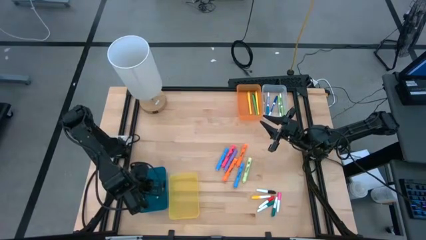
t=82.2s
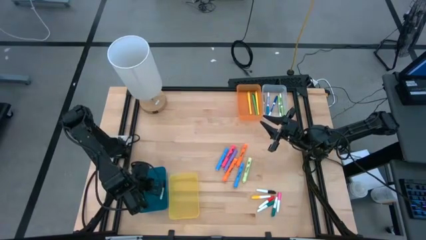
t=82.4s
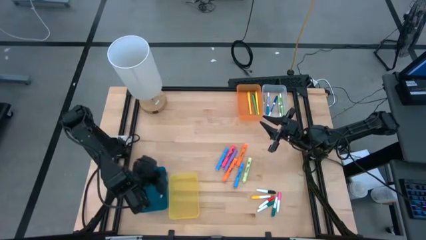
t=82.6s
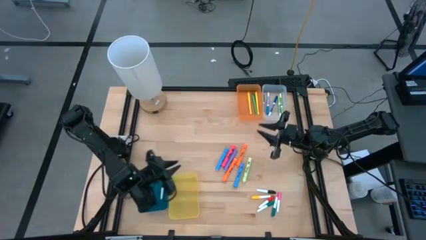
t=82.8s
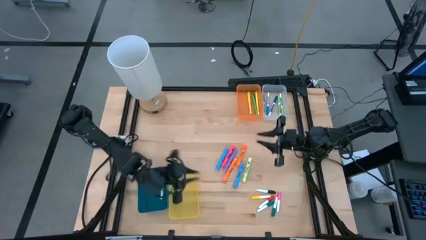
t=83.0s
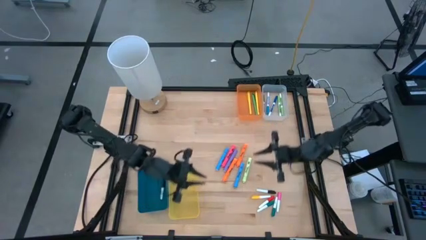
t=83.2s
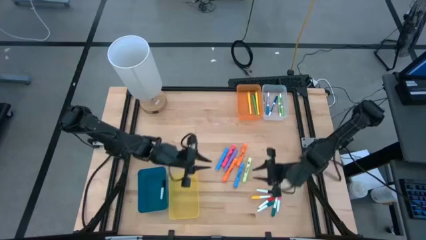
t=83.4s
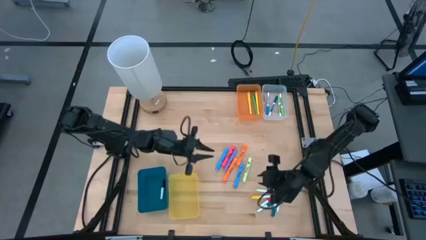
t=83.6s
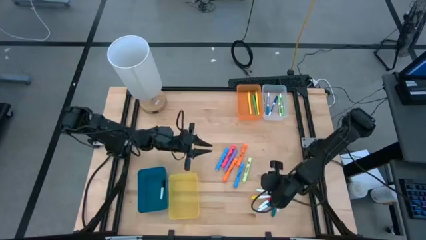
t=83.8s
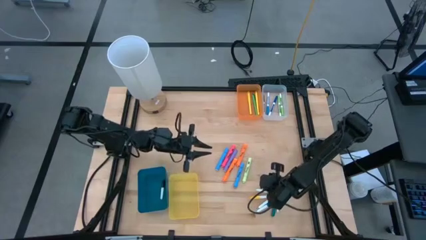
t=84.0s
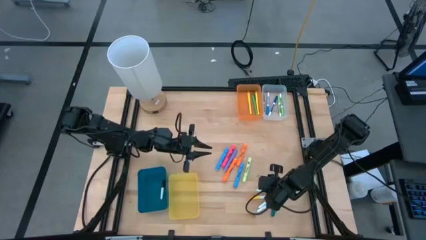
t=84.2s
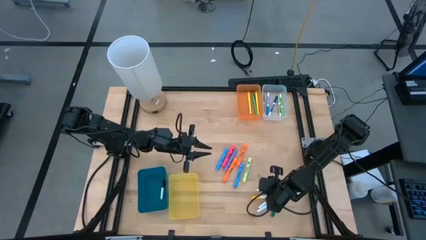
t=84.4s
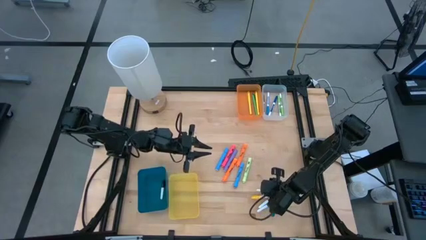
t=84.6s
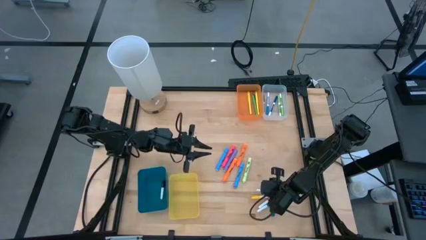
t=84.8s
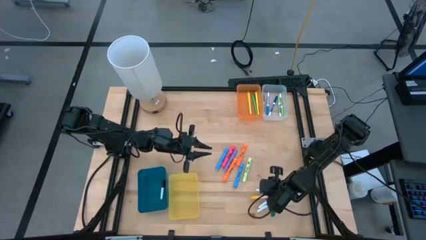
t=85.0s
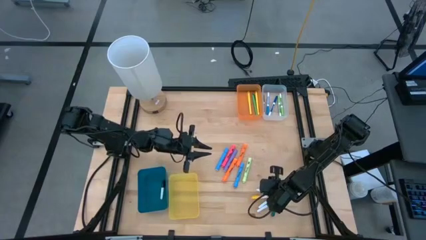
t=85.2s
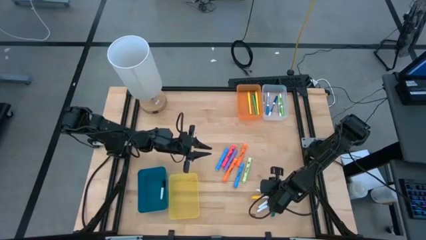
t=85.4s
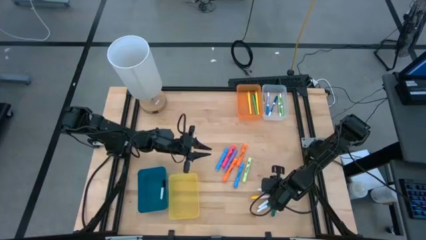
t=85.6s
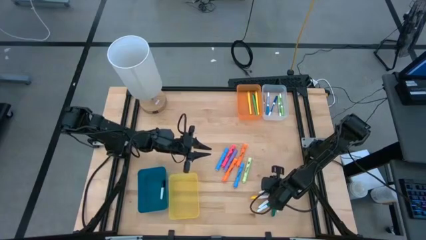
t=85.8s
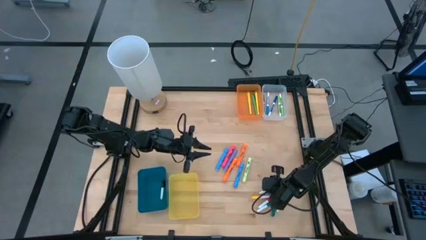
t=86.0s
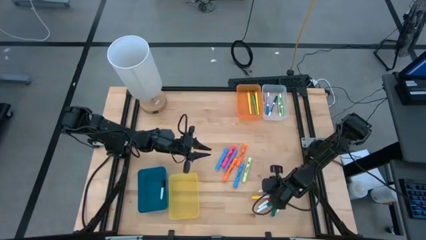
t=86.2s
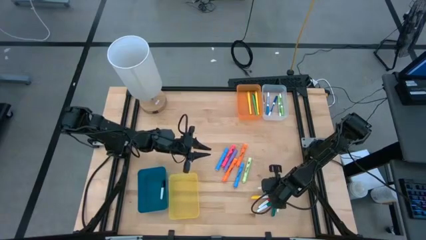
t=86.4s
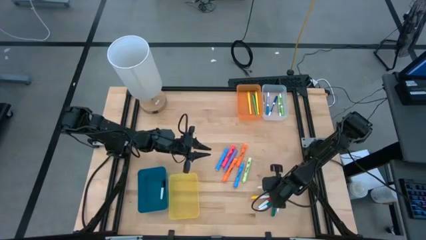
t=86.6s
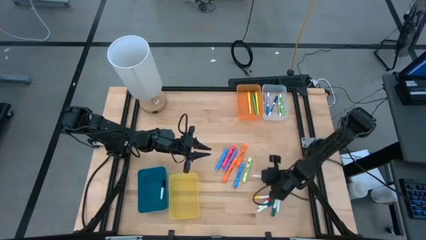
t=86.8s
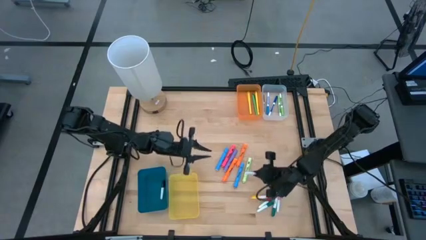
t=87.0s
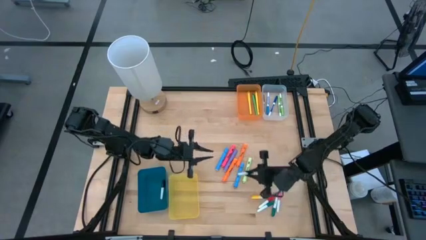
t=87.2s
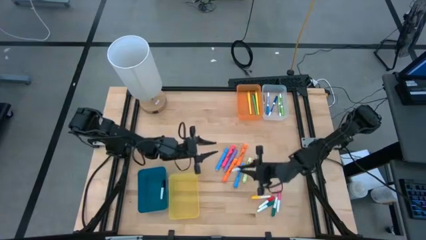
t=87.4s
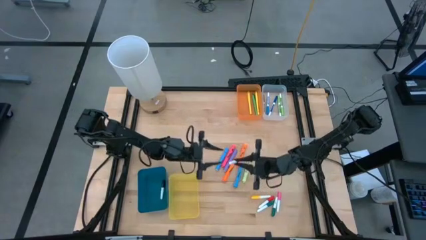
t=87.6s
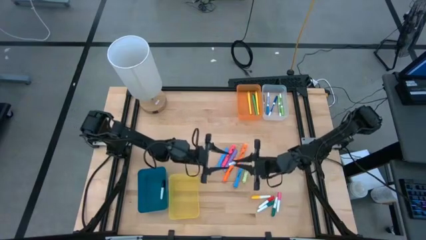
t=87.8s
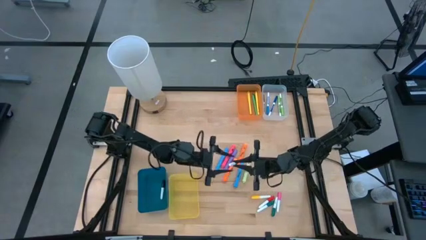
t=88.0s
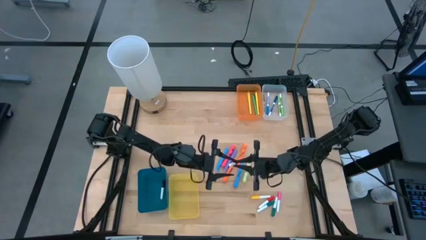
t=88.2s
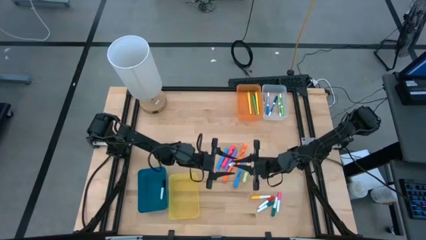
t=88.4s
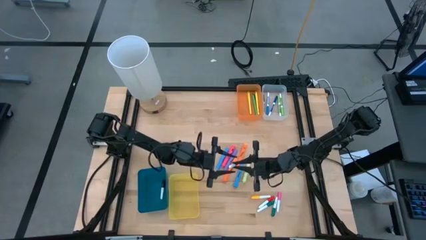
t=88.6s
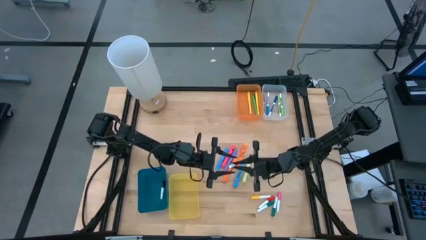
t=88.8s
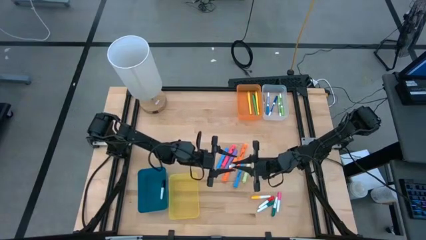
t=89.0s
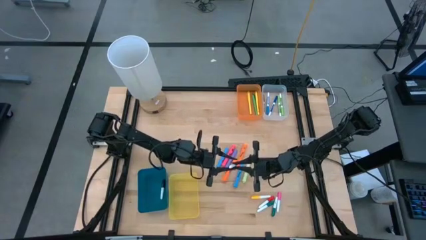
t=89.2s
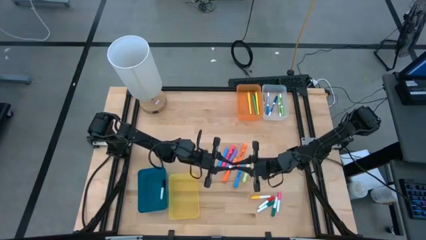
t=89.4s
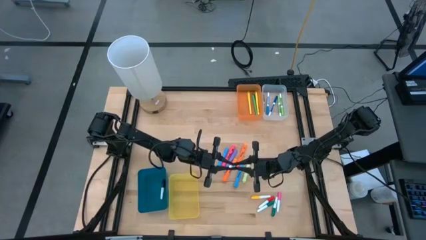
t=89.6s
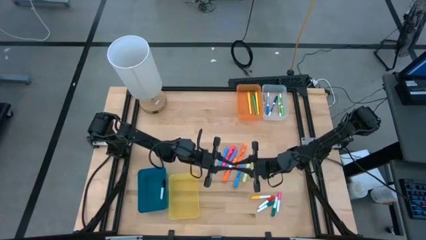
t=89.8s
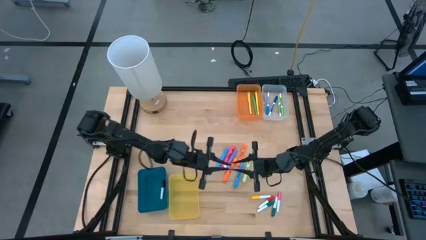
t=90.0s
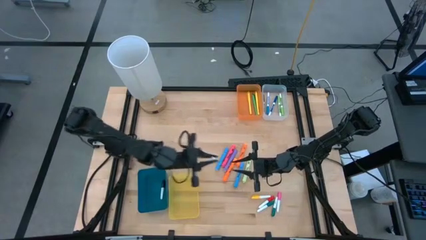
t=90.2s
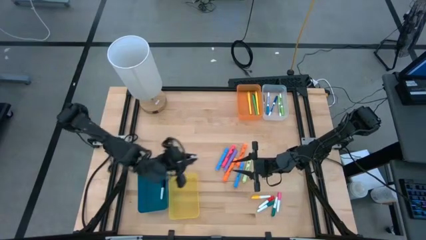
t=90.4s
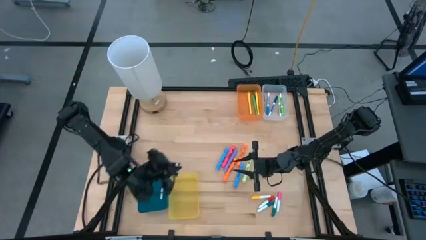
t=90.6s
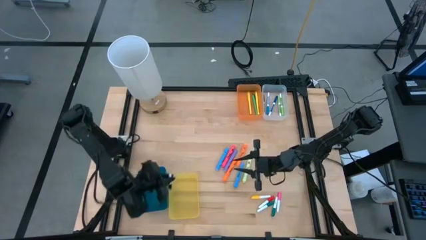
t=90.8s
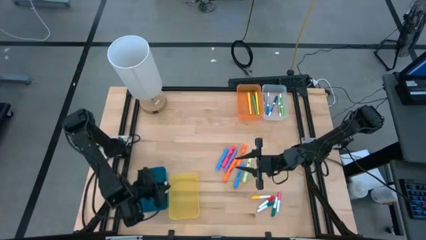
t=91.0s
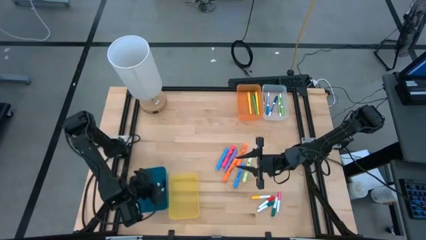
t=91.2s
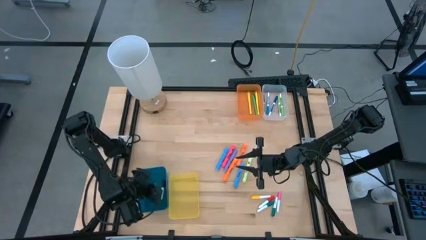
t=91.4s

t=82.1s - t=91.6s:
Task: Pick & Place Markers
Put the white and black highlighter pen into the blue bin

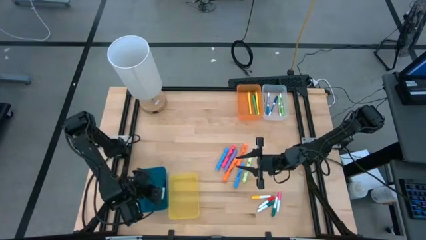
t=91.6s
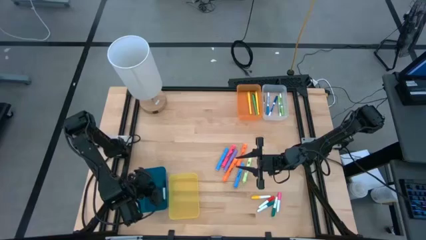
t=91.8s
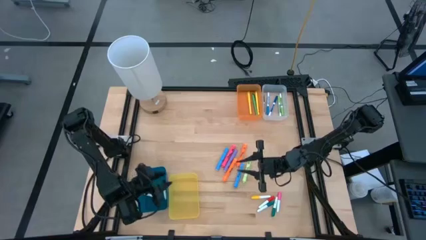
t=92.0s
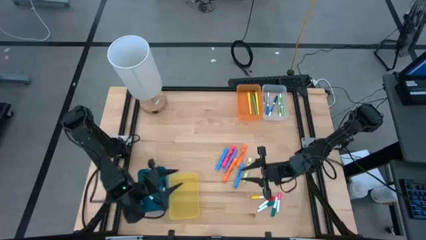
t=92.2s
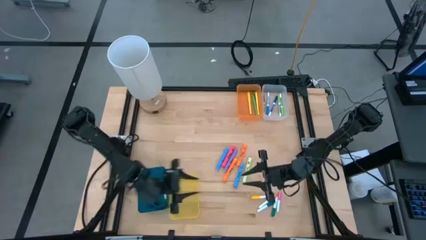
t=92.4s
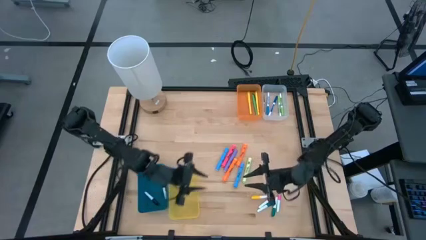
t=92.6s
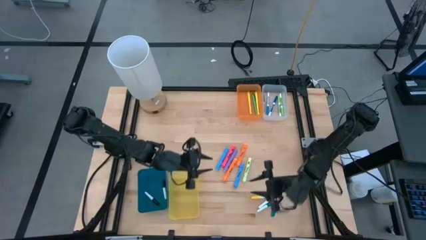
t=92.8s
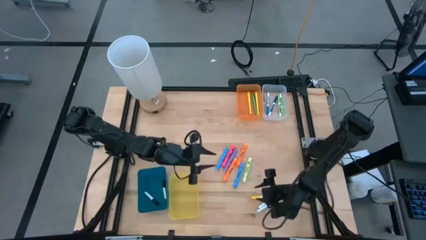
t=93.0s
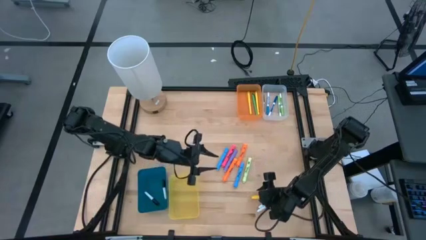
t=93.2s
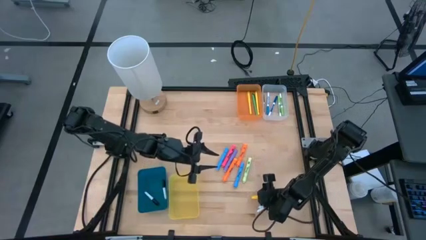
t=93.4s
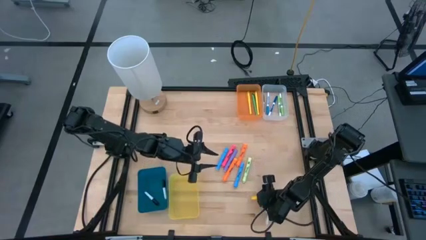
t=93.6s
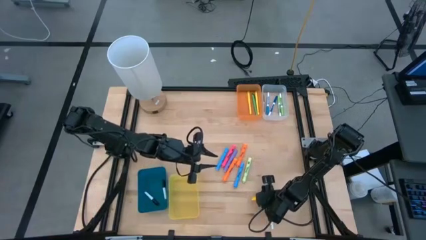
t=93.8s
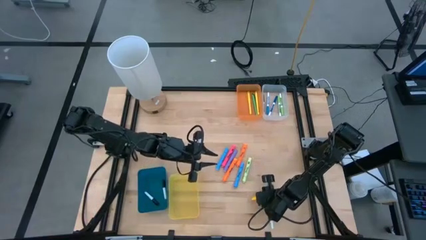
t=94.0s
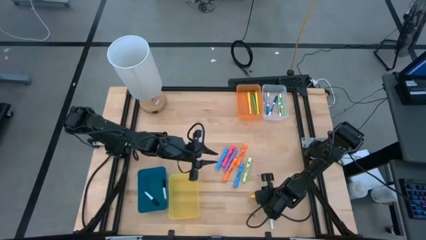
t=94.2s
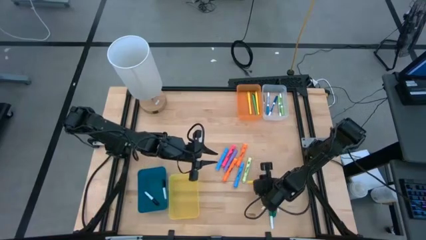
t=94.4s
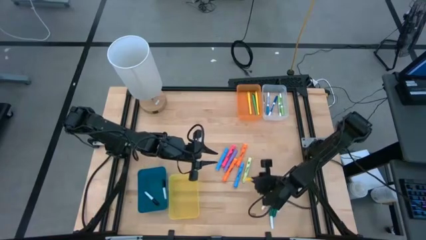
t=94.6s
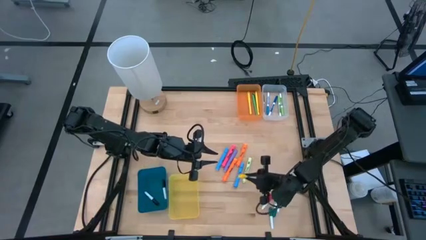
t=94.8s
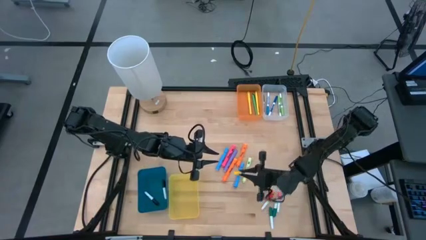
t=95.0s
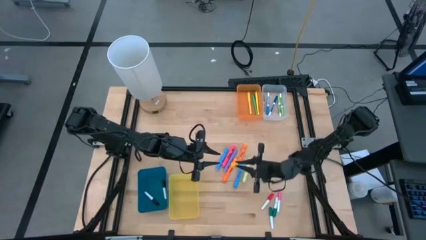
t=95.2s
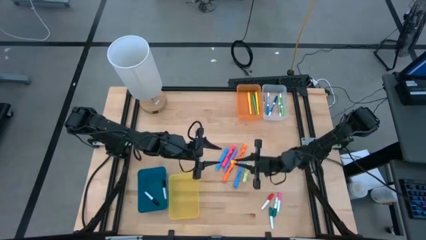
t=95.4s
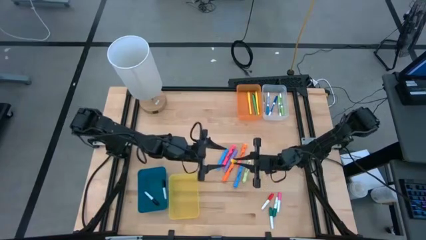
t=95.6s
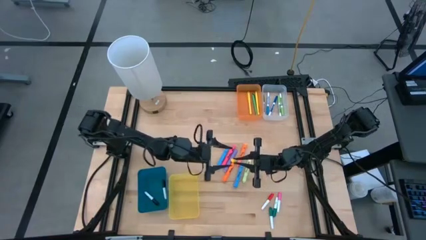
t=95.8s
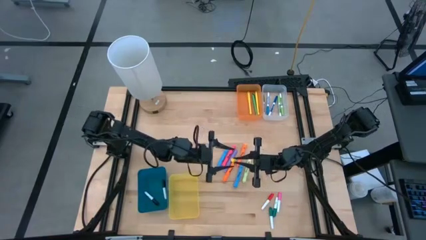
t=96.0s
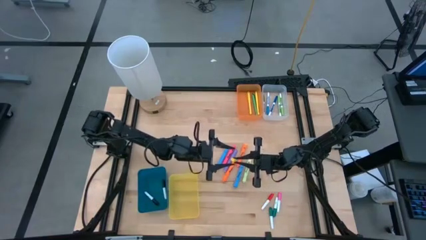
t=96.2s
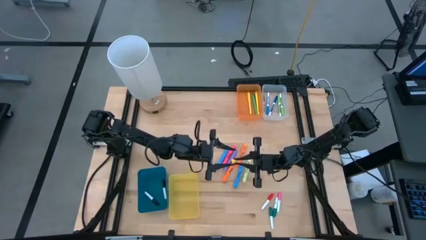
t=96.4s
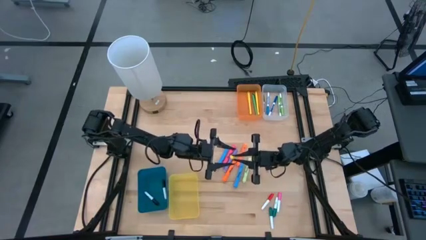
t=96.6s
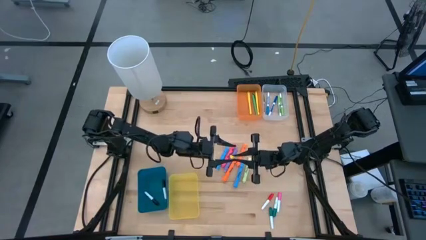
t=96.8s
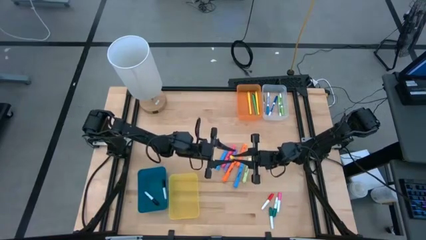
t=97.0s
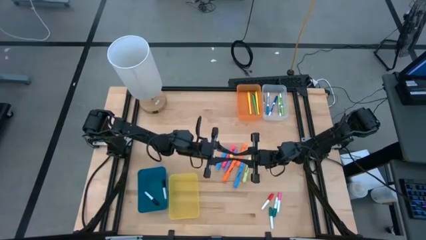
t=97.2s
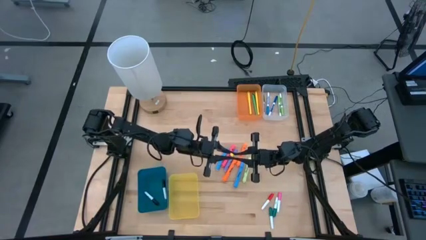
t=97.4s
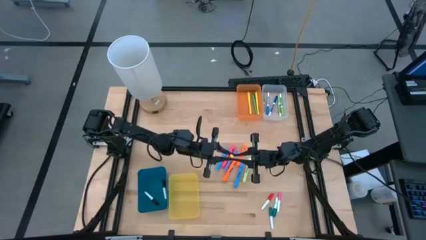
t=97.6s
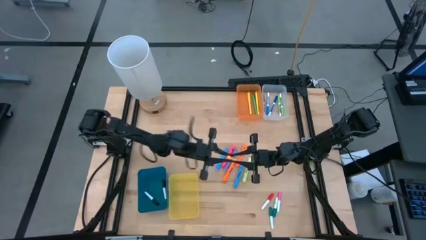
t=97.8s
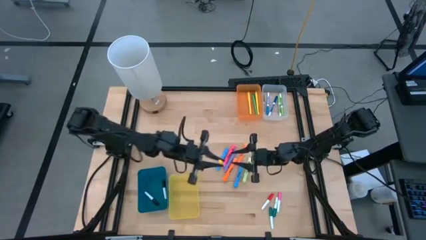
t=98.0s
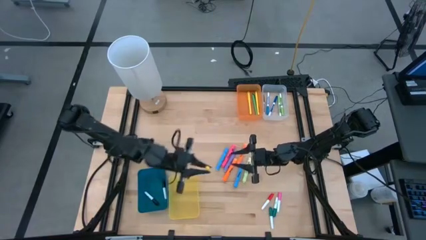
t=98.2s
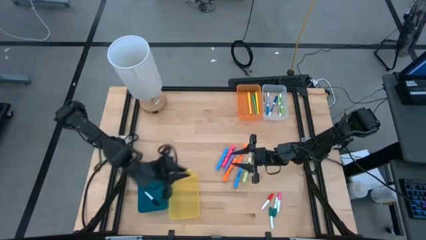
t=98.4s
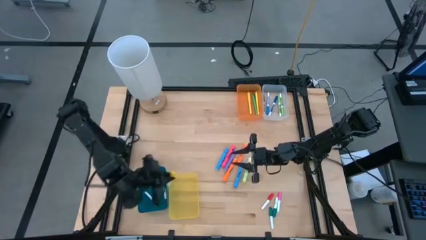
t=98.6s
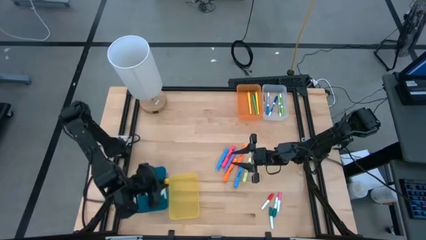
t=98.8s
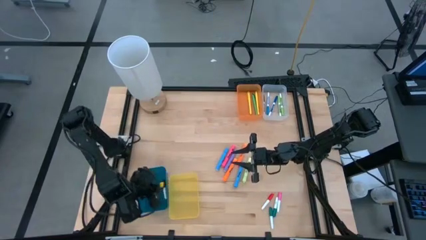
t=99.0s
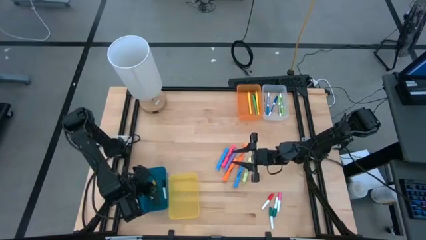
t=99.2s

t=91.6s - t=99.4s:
Put the white and yellow highlighter pen into the blue bin
